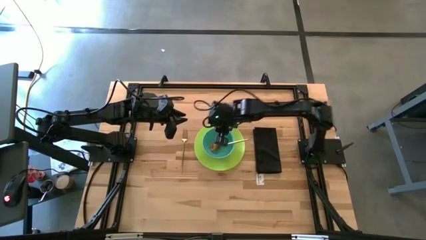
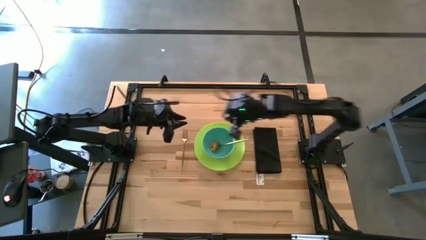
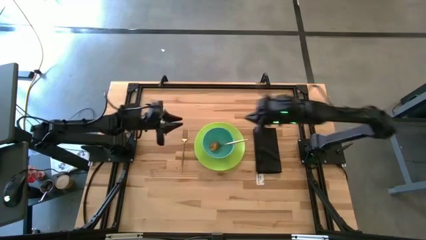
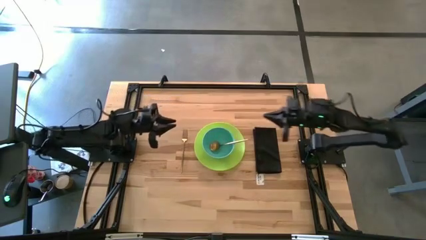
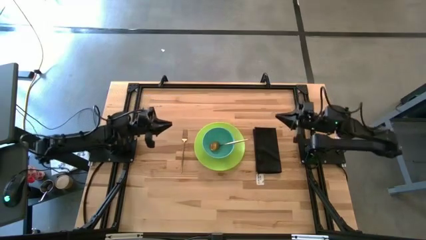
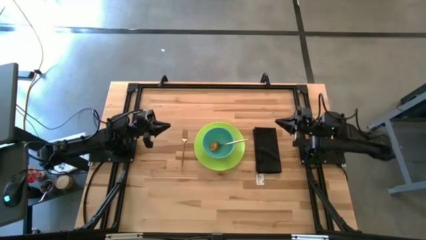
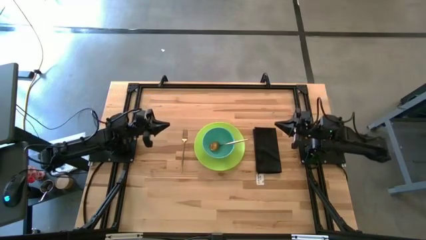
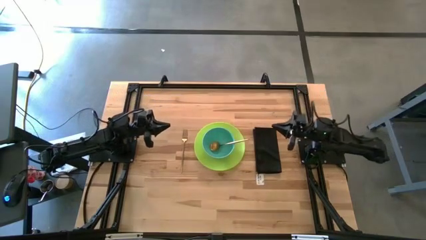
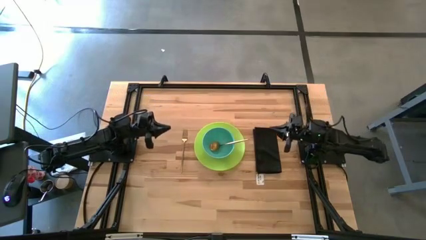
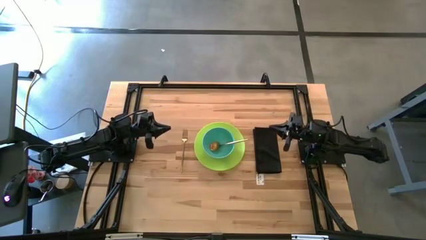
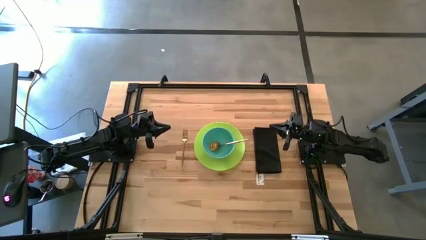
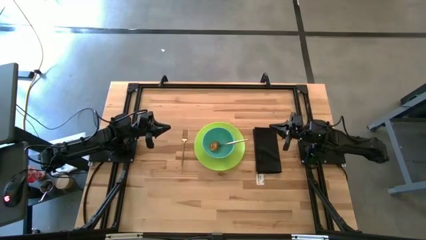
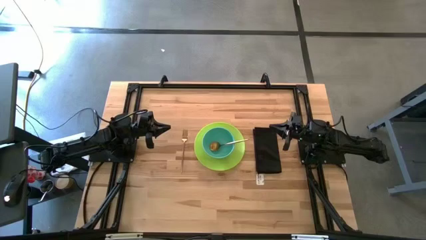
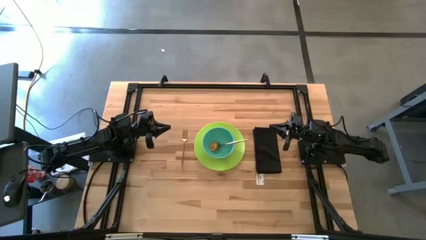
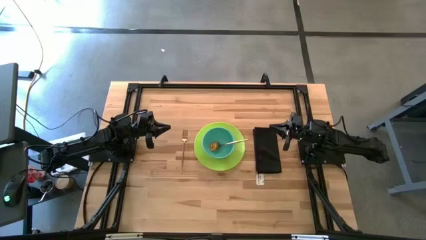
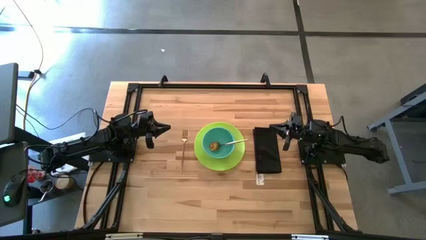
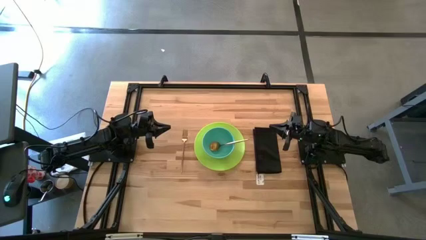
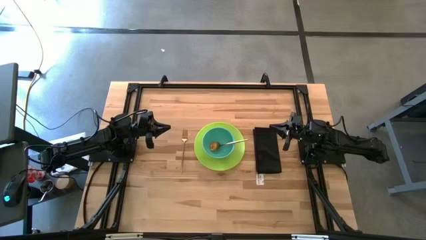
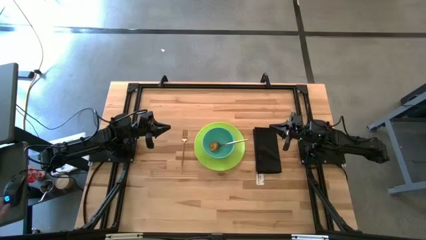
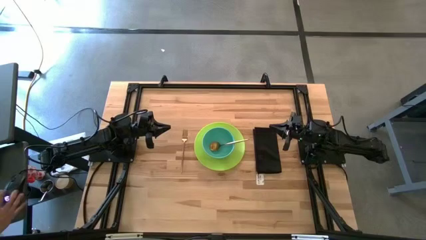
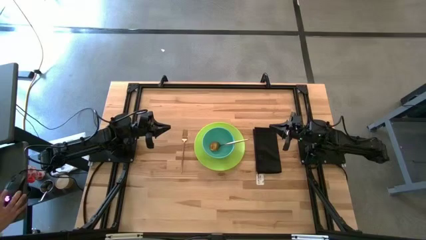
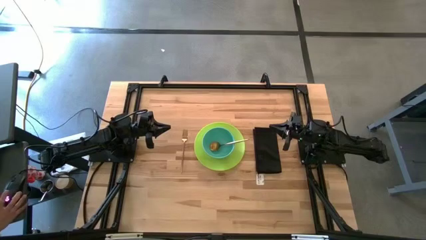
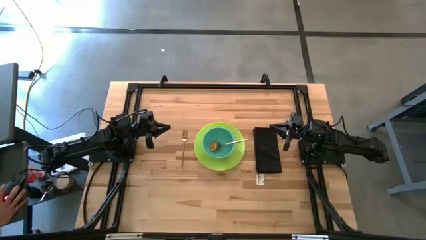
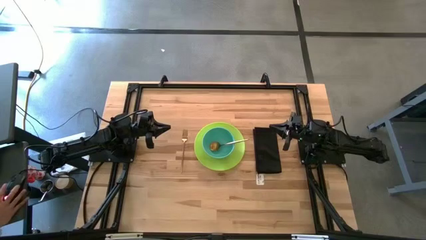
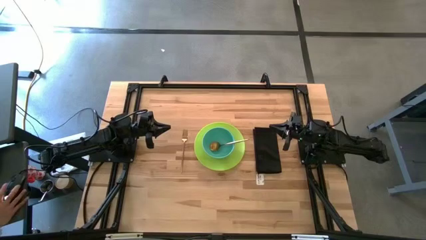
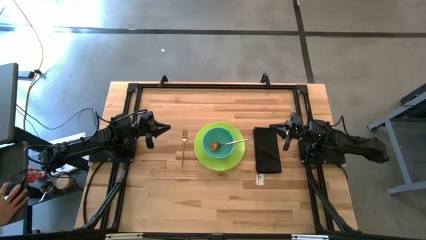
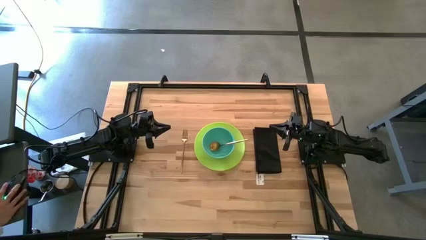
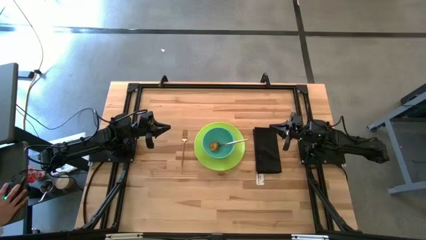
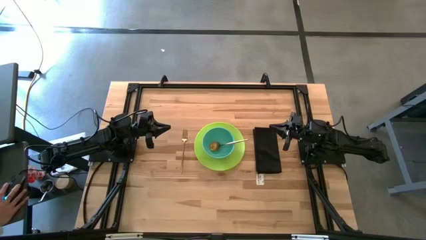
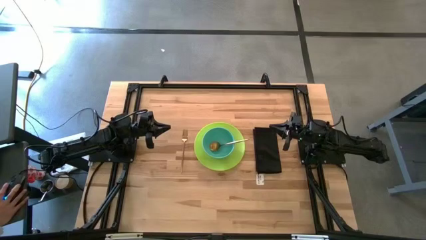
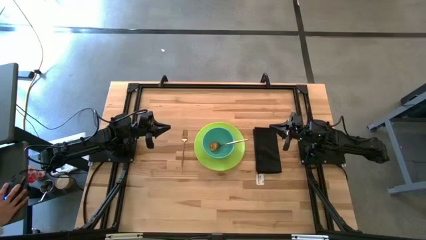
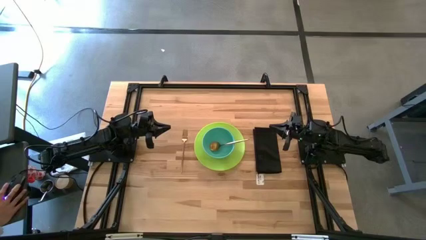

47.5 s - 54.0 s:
Task: Set table place
Return to Home Position

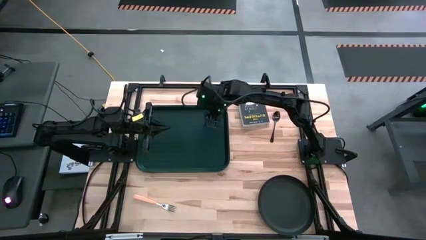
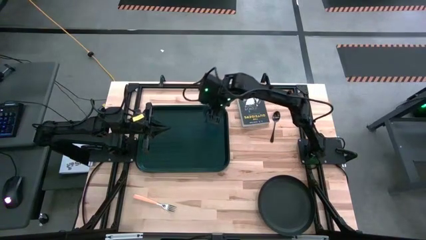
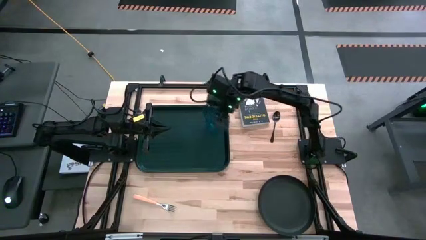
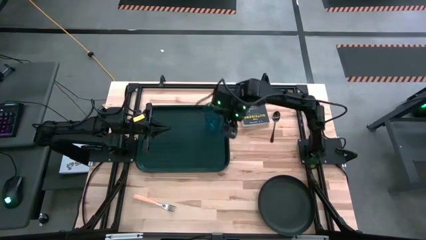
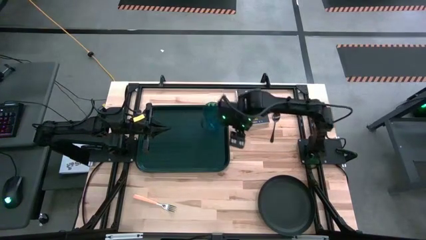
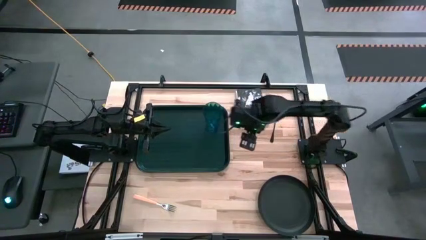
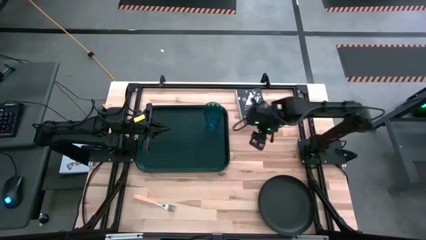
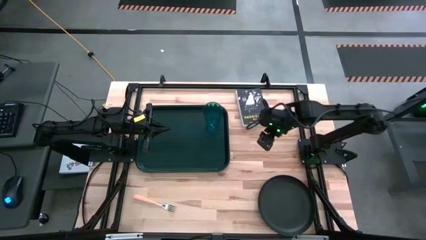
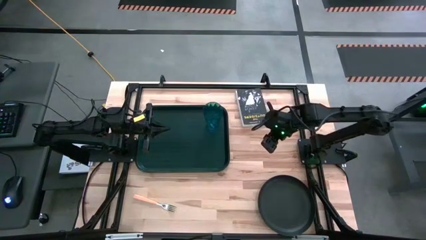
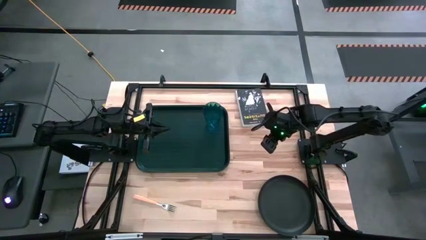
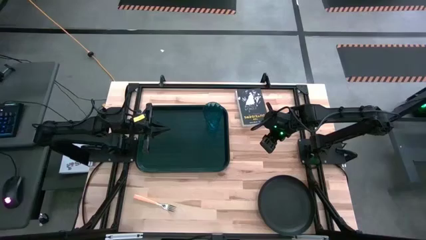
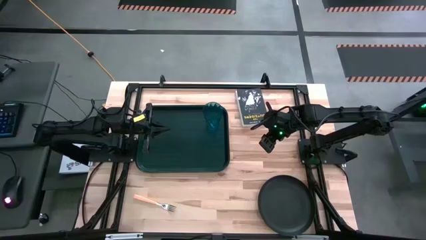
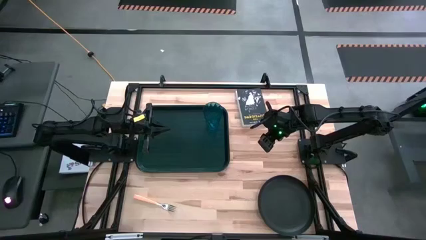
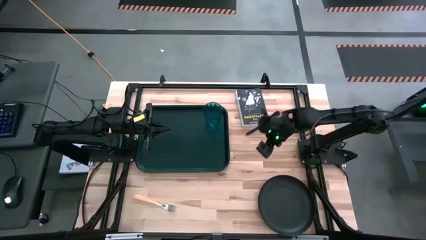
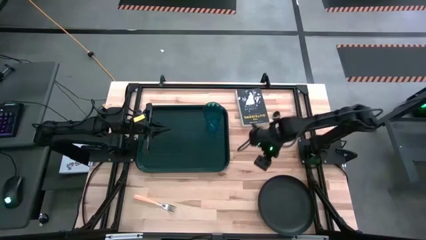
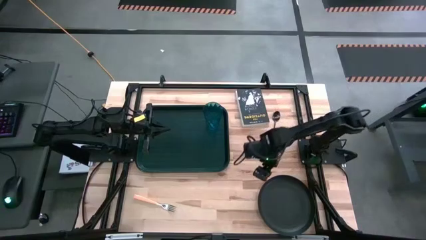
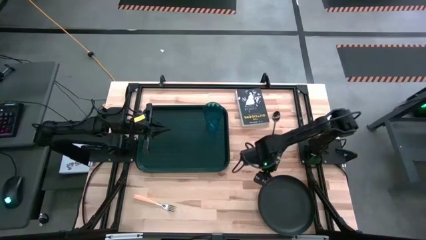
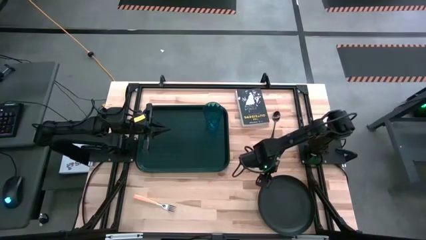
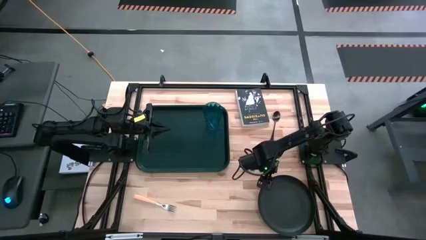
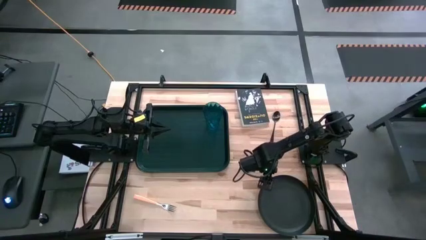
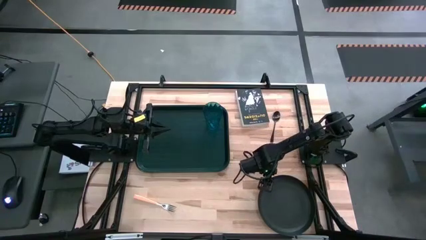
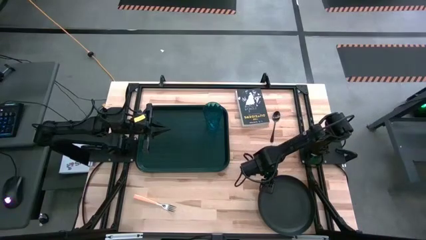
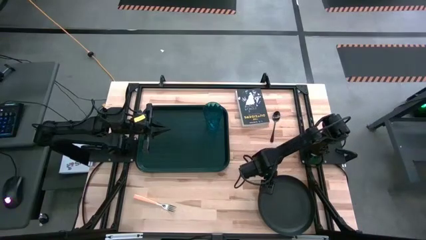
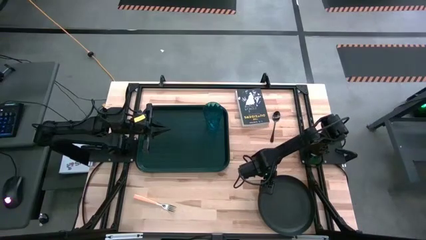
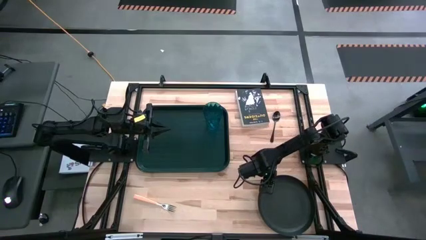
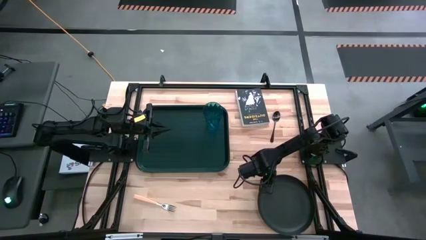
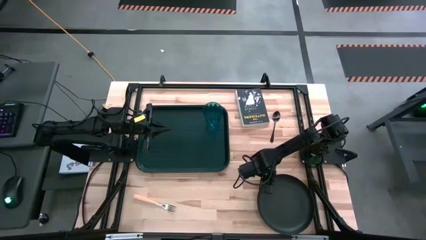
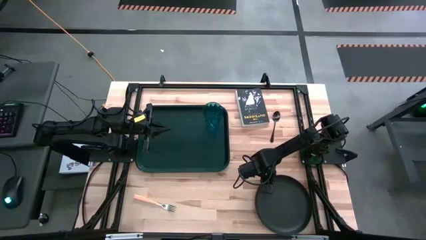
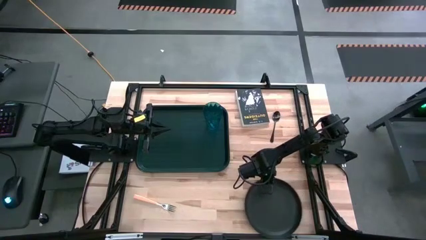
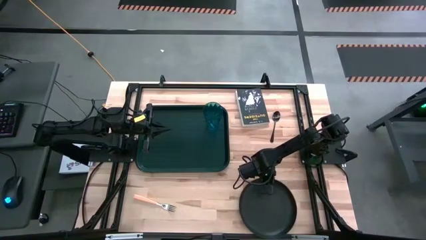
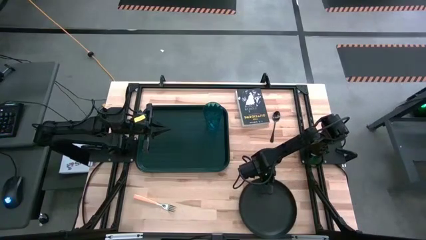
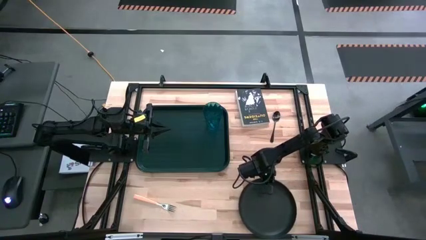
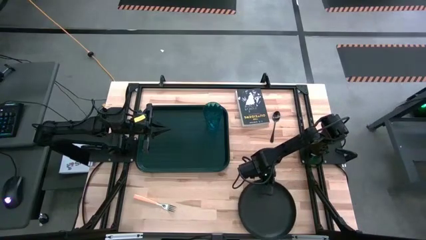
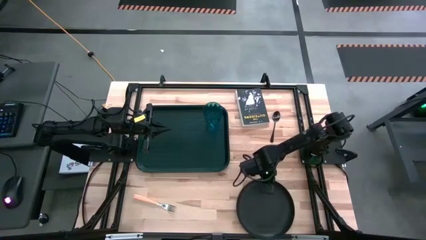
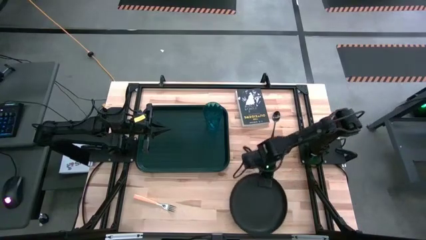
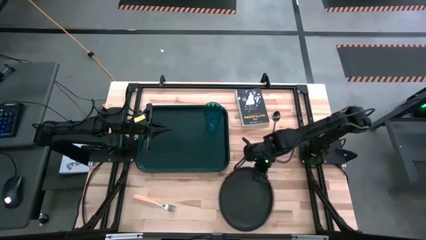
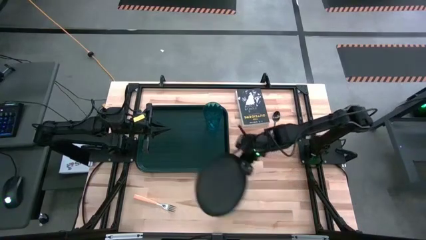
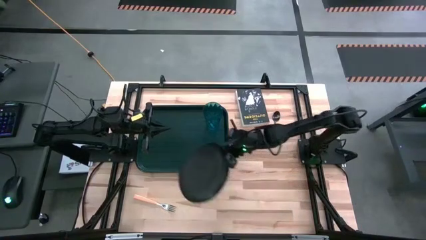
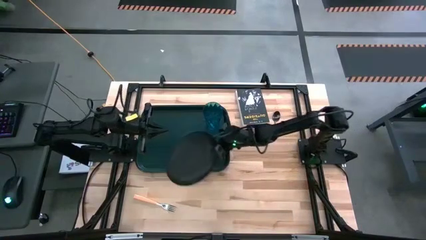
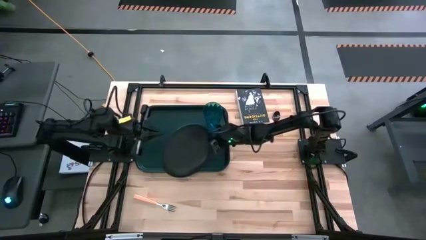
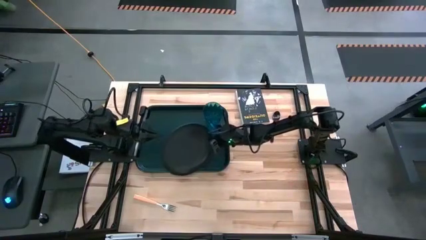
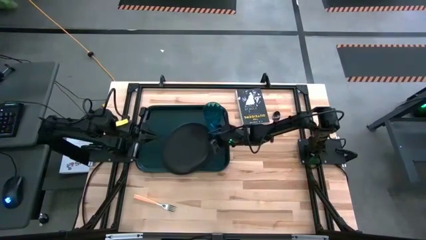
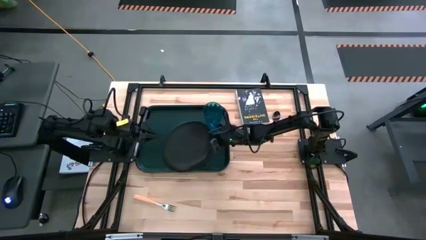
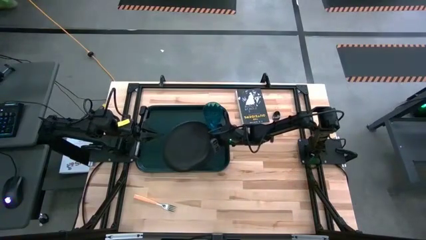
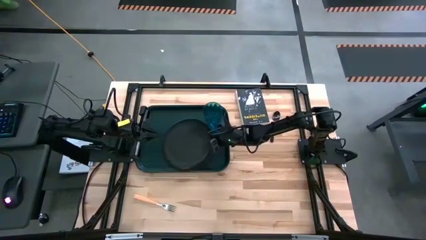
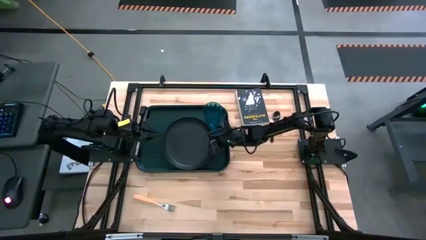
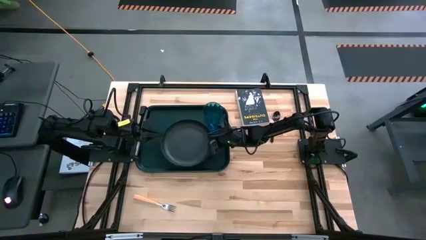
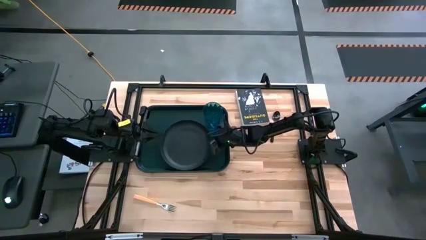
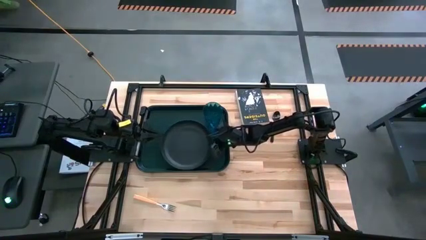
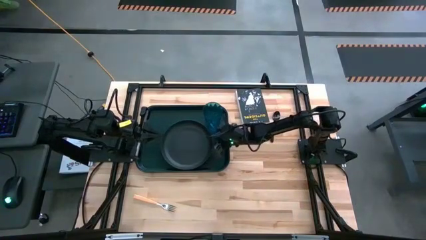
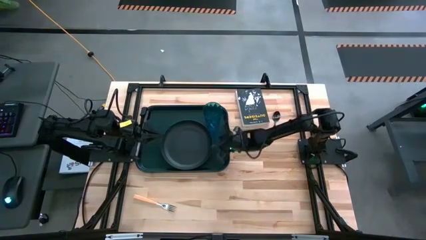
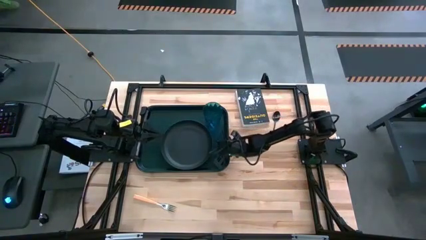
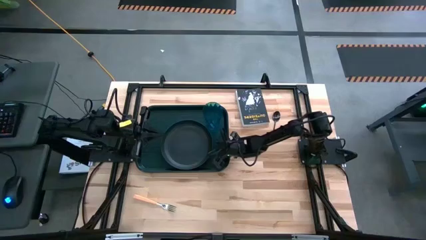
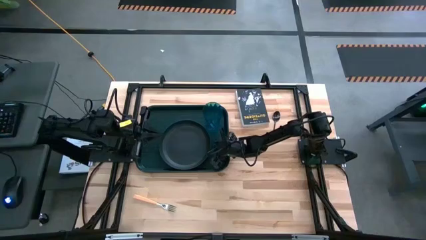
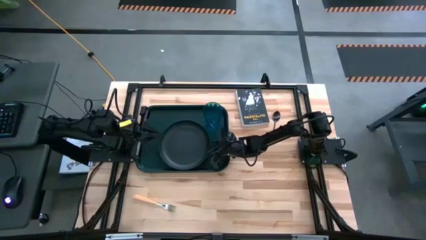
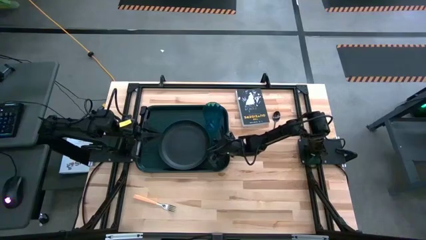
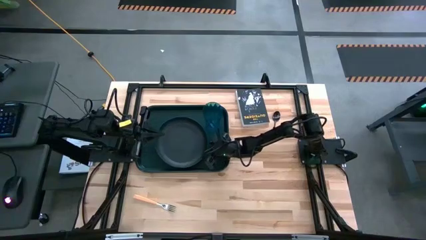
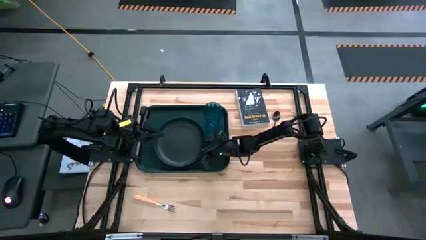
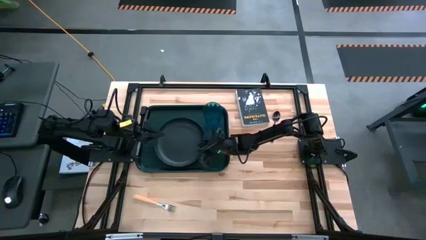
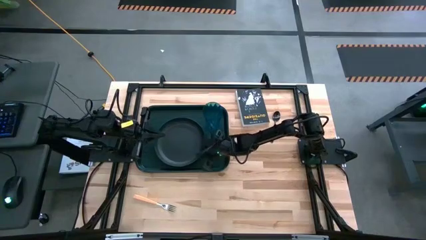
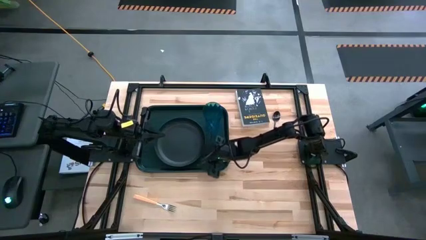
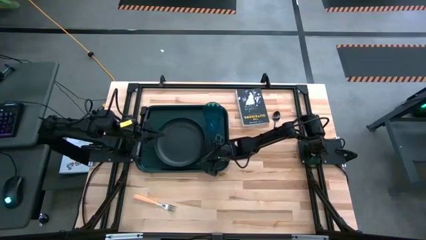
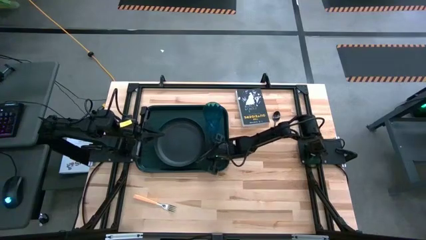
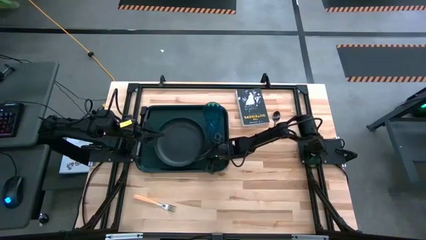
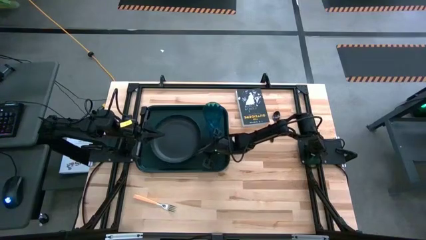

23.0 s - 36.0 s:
Task: Pick and place plate/cup/fork/spoon on tray
Put the black plate on the black tray
